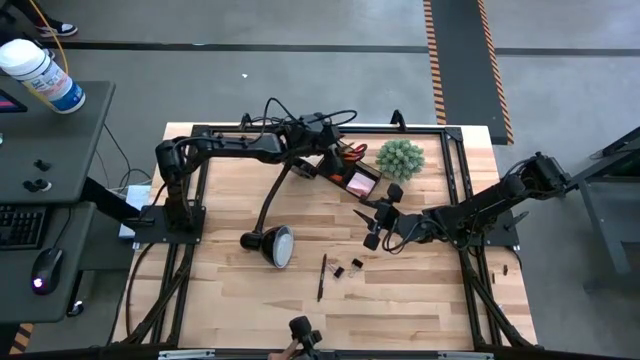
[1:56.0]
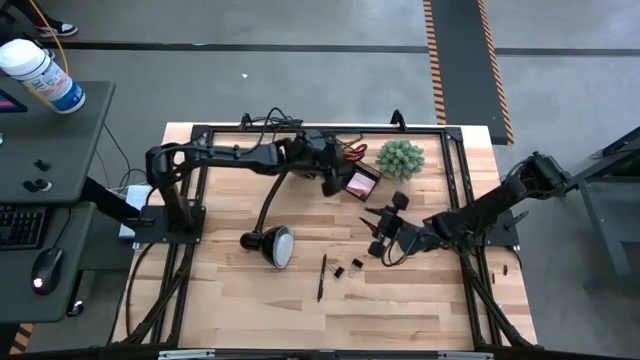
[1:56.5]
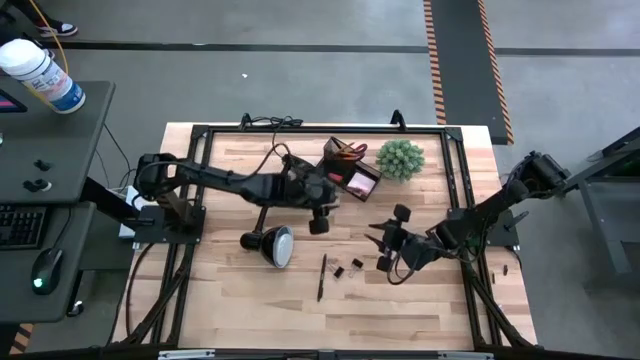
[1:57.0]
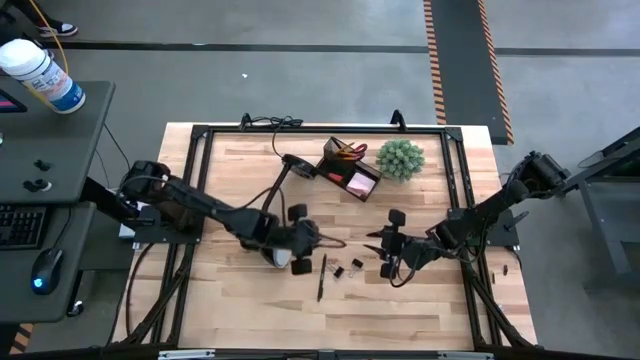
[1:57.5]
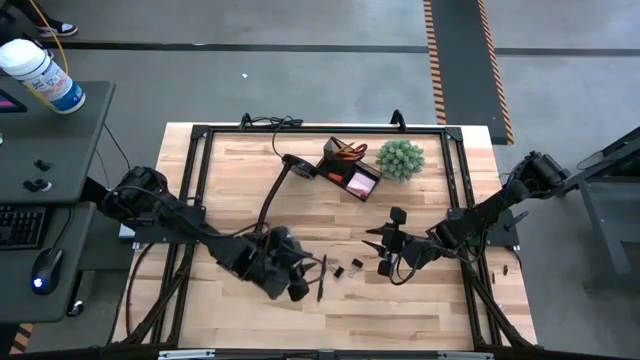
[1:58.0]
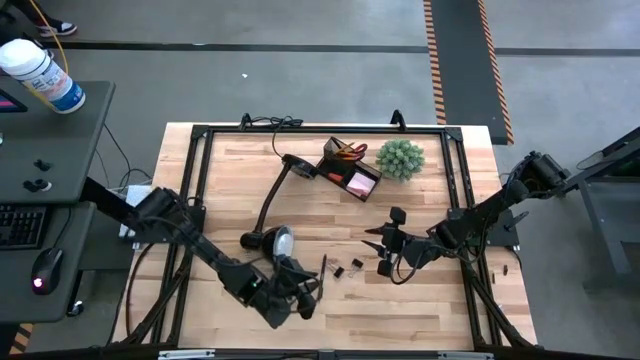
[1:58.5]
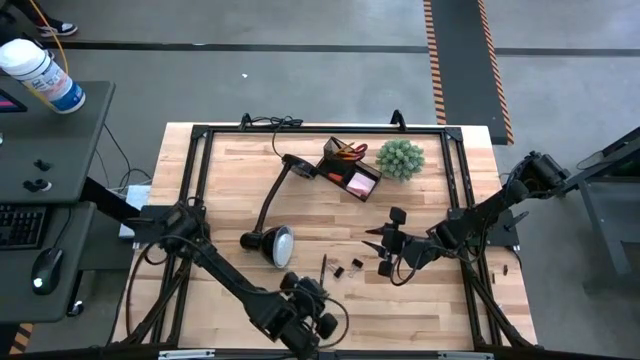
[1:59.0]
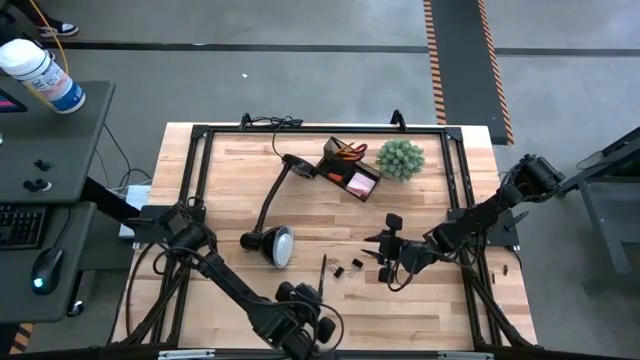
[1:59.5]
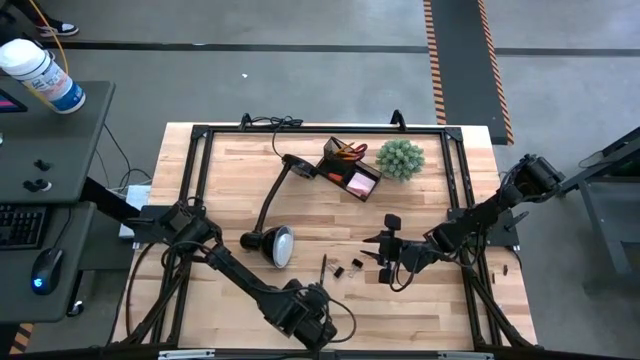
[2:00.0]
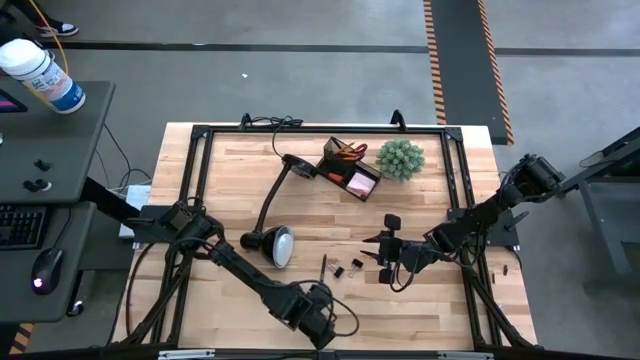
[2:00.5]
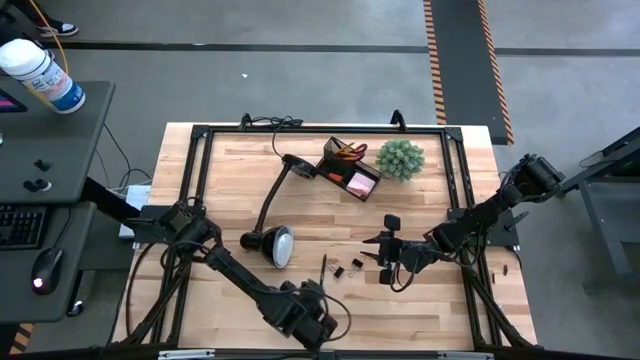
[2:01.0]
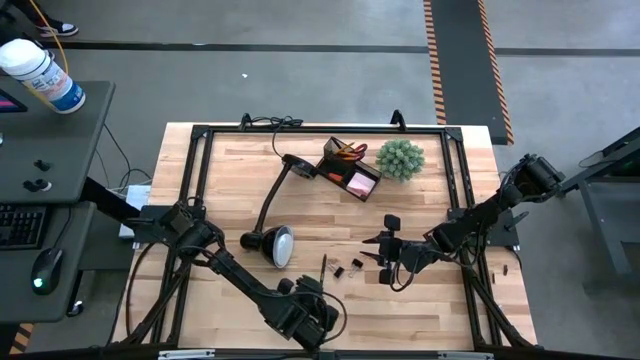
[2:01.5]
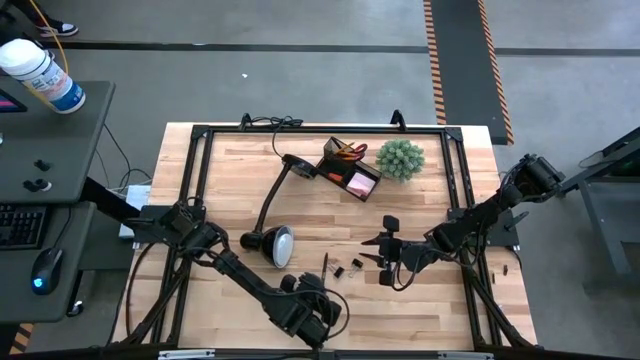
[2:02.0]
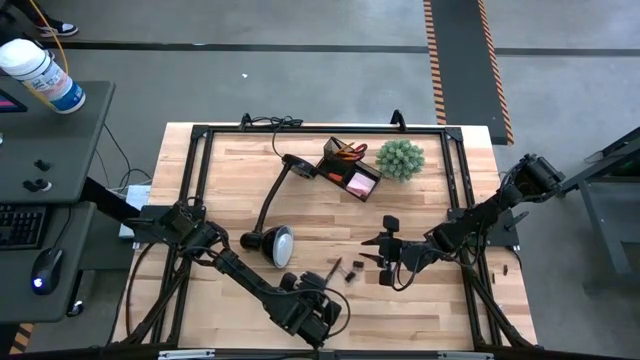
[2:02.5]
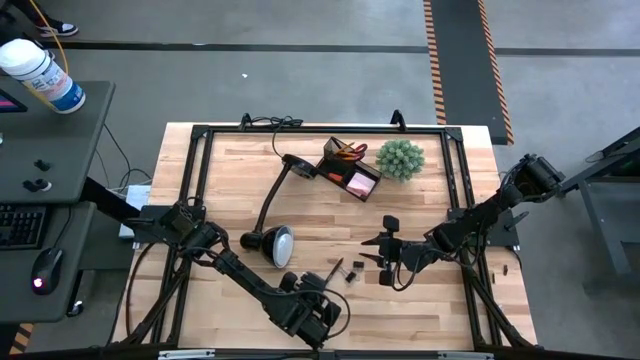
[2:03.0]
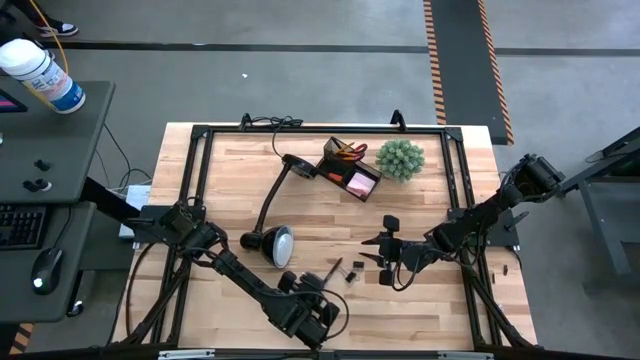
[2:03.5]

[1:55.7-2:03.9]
Task: Pick and place office supplies into organizer
Put the black pen into the desk organizer

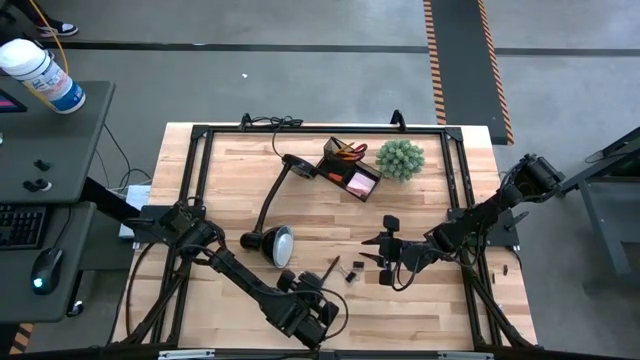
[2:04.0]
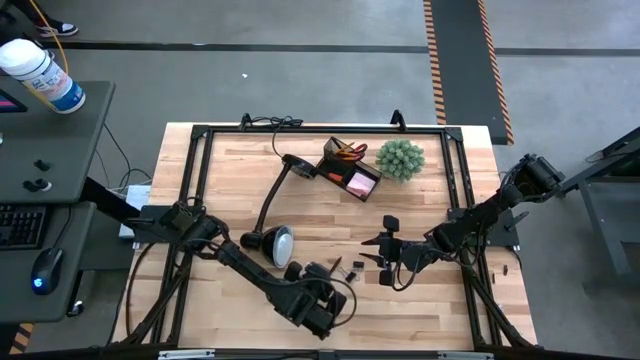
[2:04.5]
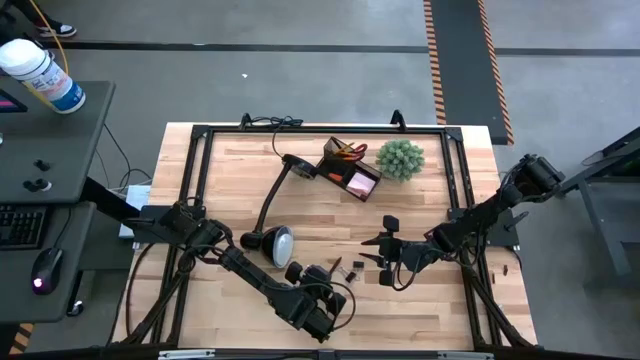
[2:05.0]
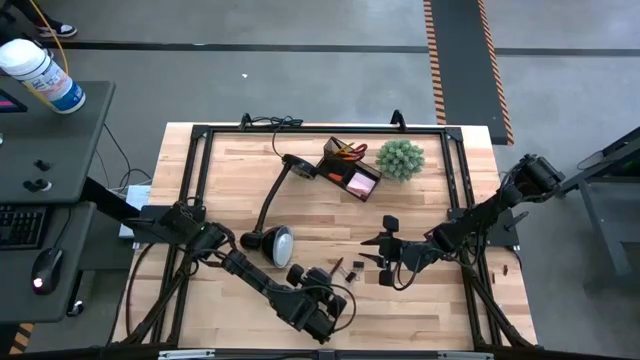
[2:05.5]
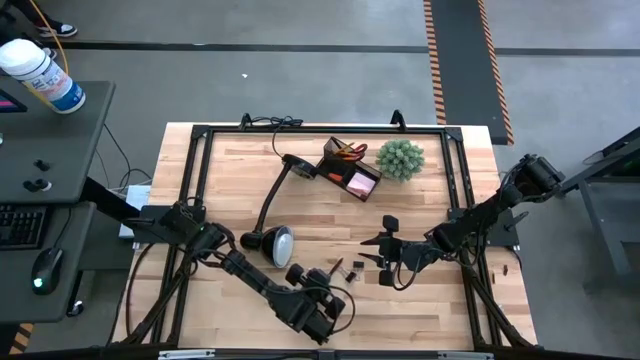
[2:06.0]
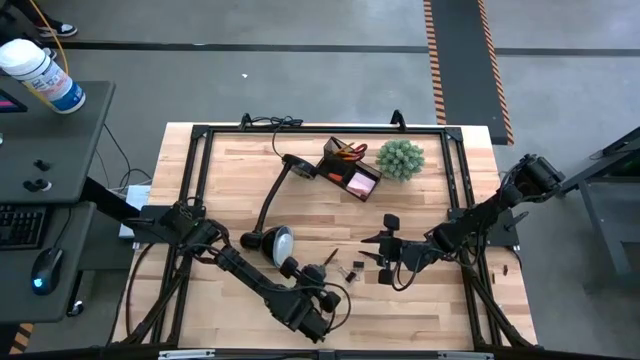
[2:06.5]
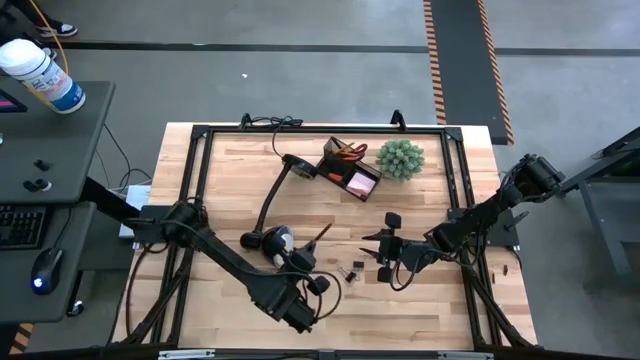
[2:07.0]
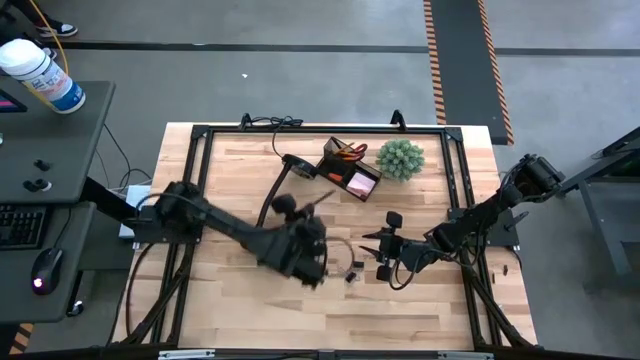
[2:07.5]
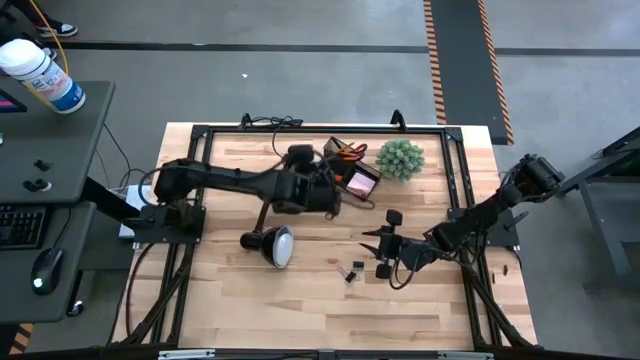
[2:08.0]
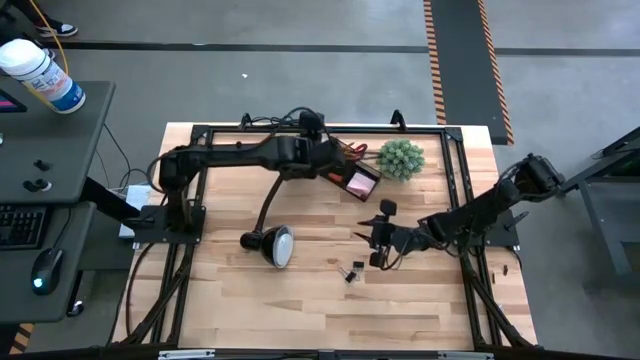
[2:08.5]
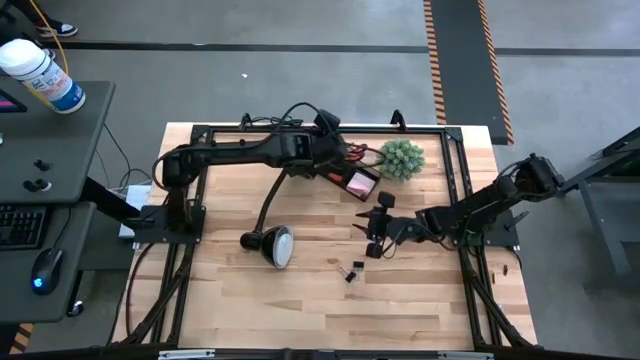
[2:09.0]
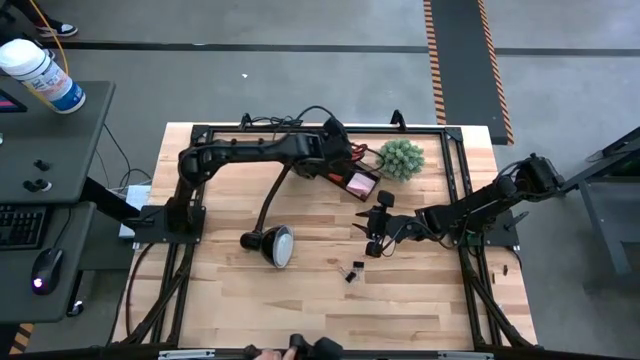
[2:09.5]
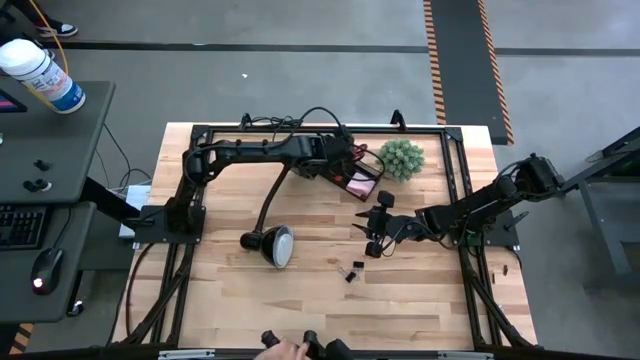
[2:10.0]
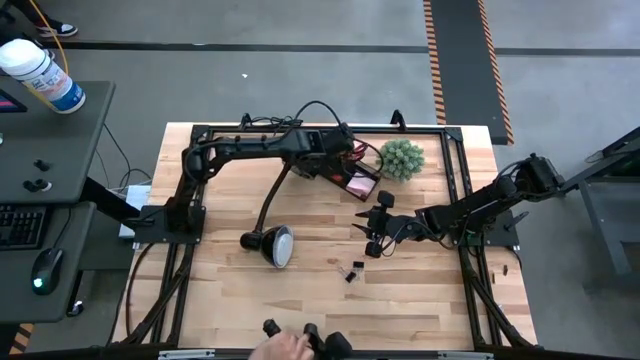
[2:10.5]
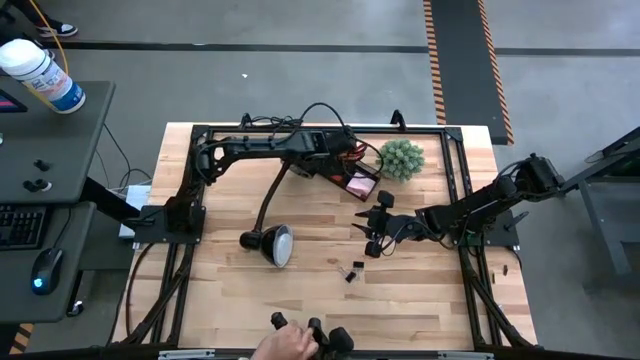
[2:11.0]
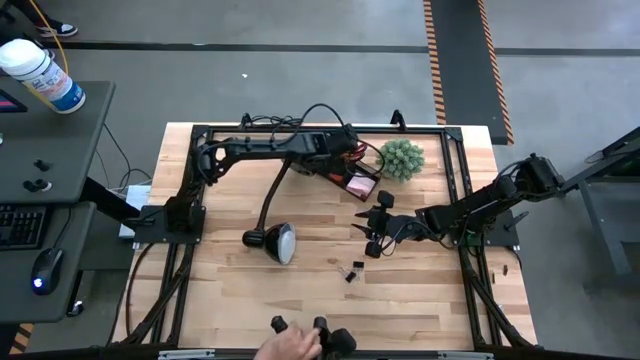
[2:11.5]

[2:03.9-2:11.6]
Put the black pen into the desk organizer

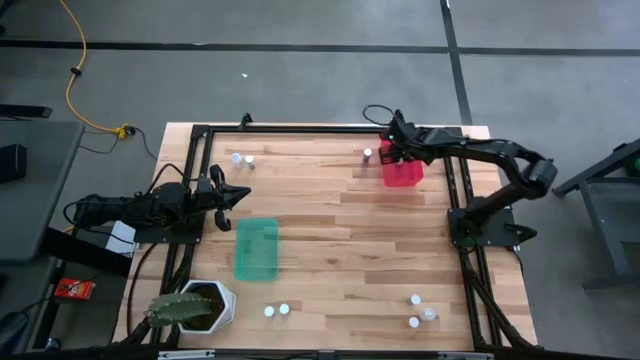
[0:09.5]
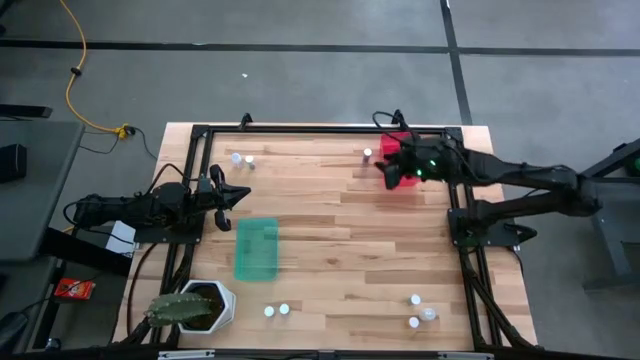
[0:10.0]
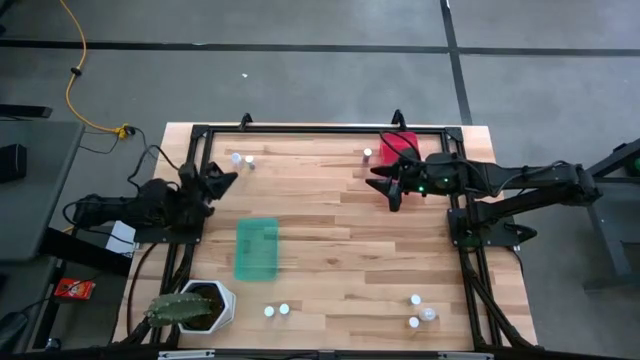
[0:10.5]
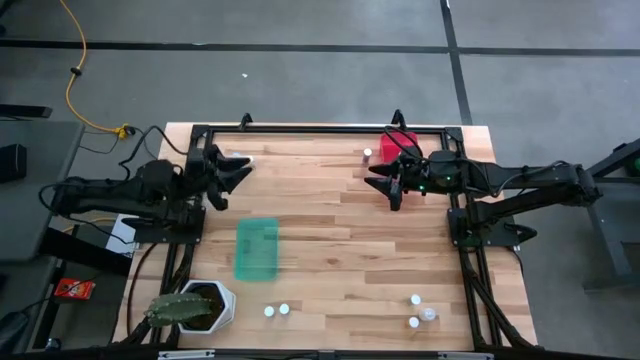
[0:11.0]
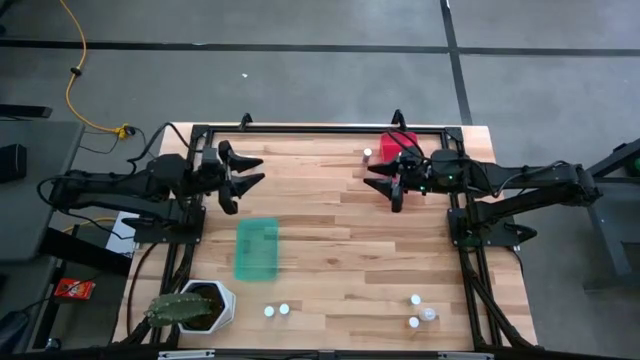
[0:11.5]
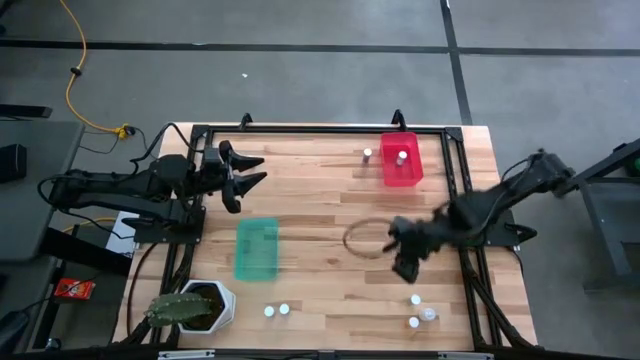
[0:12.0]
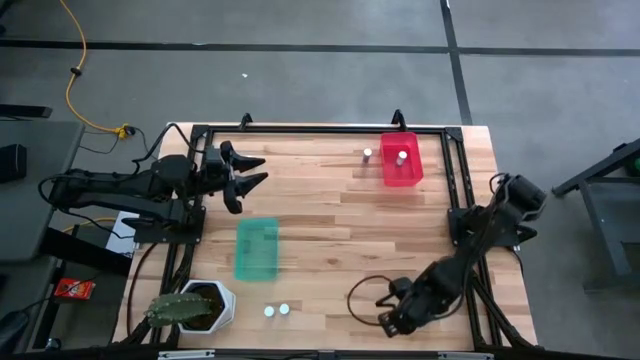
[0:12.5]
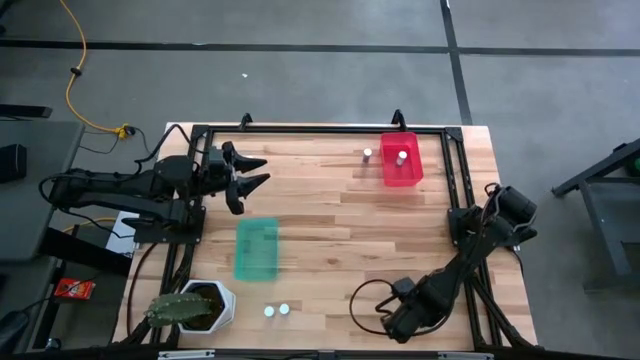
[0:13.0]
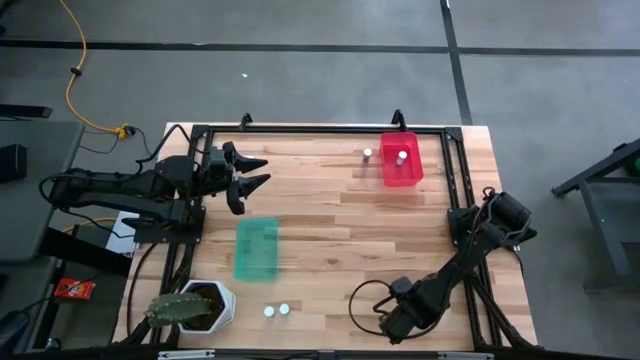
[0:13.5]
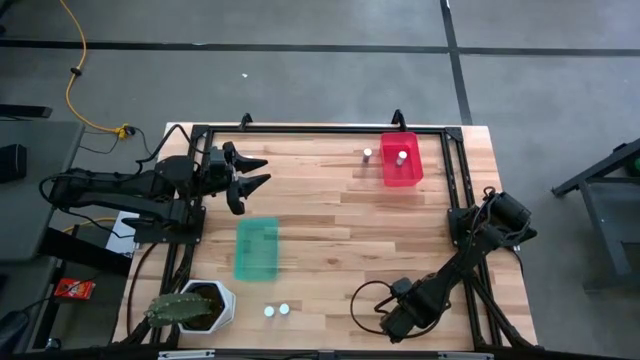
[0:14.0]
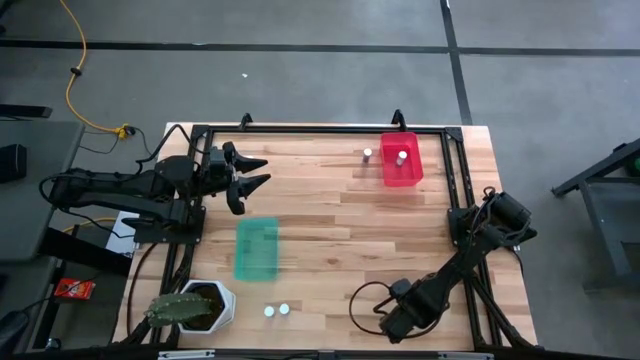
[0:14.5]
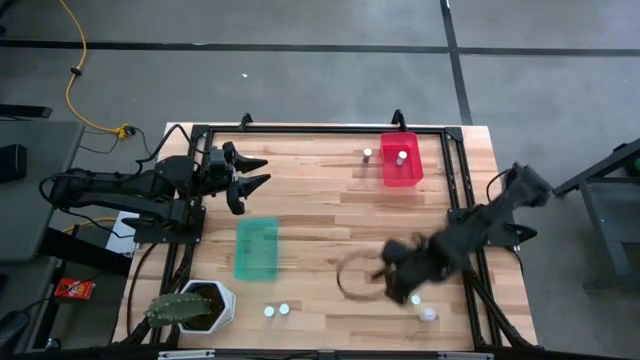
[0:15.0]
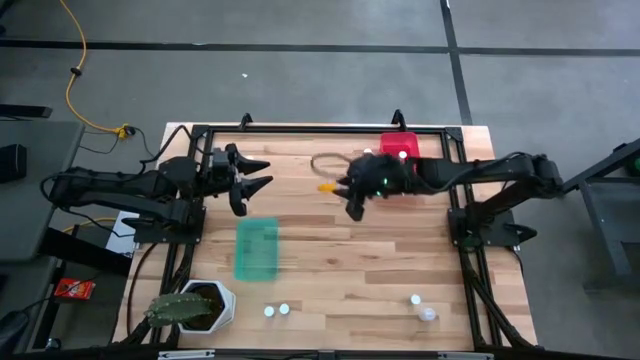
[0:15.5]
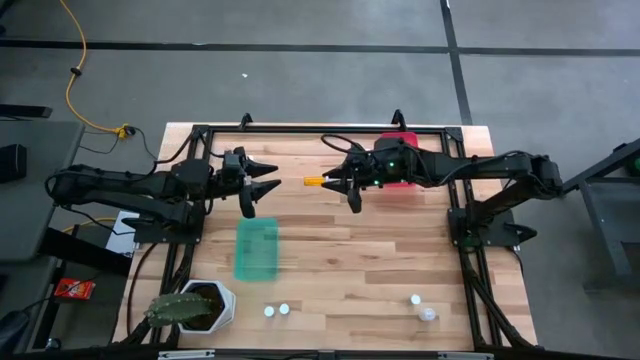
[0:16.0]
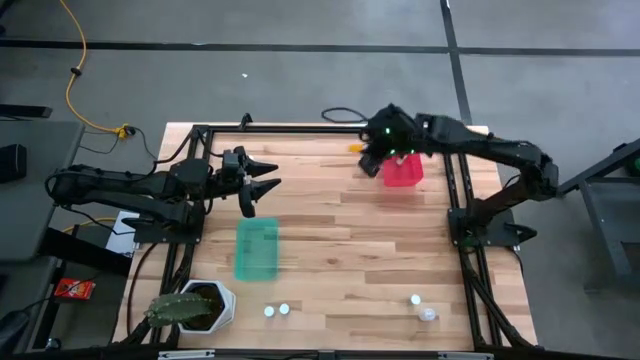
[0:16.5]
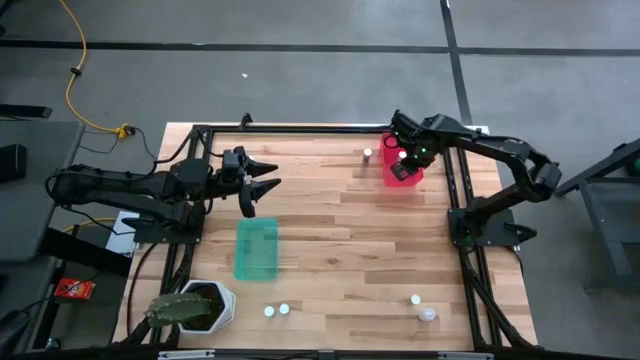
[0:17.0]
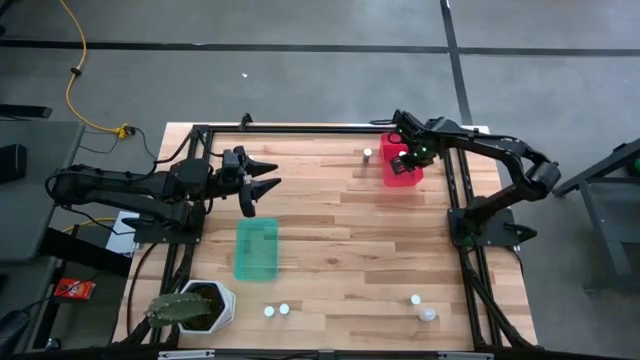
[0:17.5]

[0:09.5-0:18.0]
Task: Pick and place medicine bottles into bin by pill shape (circle, oval)
Put the orange tablet bottle into the red bin
